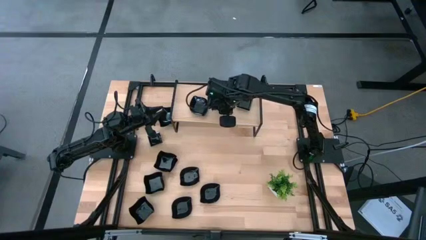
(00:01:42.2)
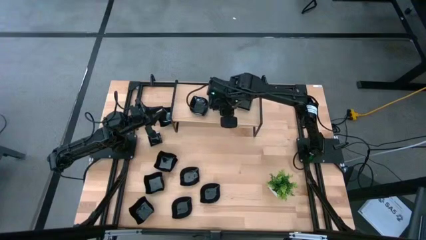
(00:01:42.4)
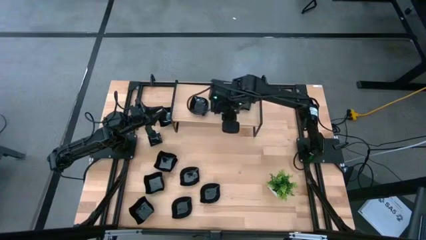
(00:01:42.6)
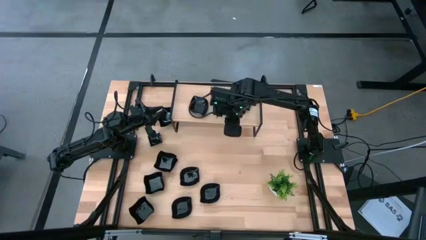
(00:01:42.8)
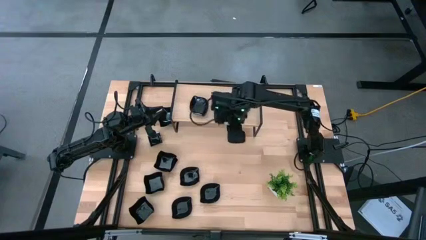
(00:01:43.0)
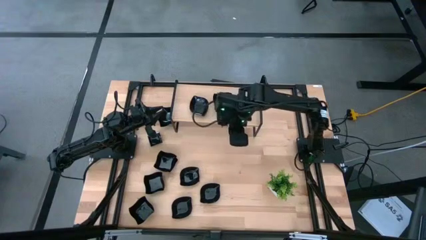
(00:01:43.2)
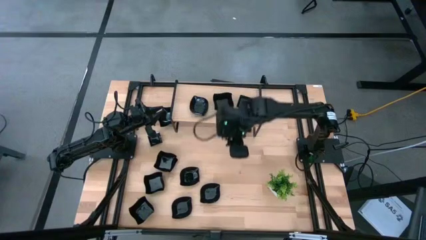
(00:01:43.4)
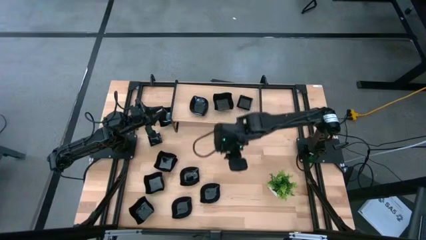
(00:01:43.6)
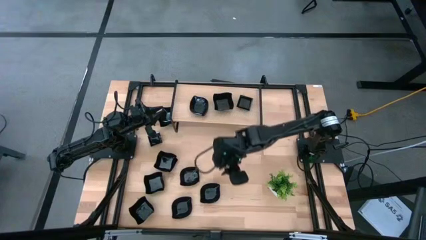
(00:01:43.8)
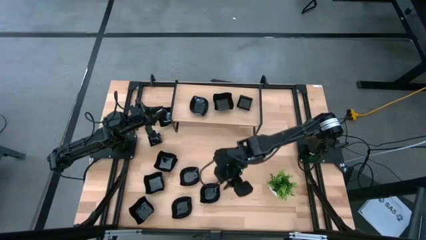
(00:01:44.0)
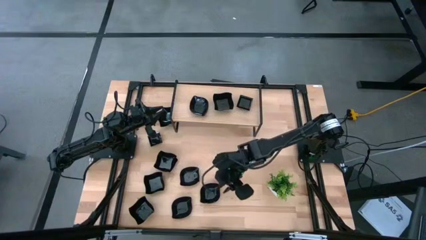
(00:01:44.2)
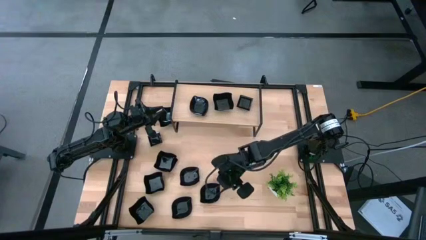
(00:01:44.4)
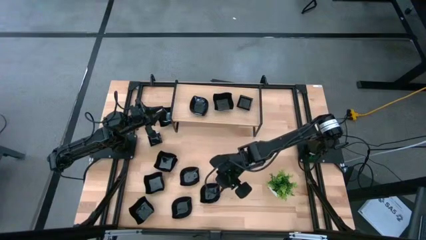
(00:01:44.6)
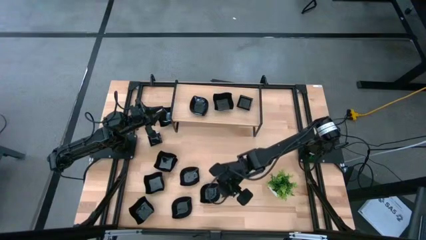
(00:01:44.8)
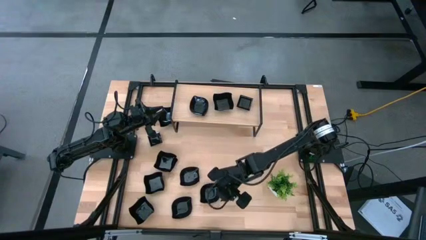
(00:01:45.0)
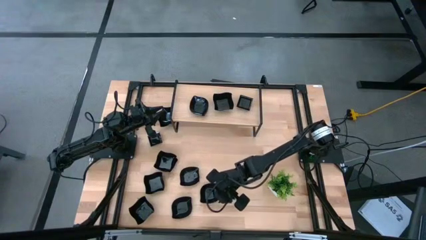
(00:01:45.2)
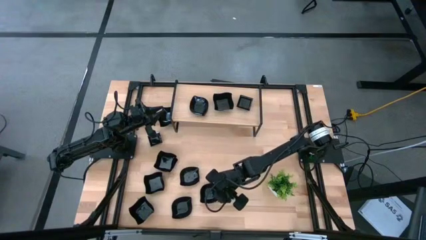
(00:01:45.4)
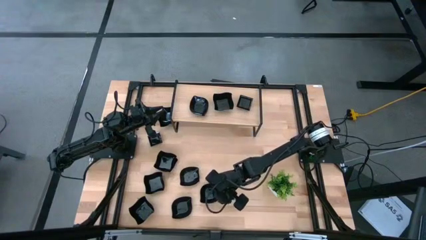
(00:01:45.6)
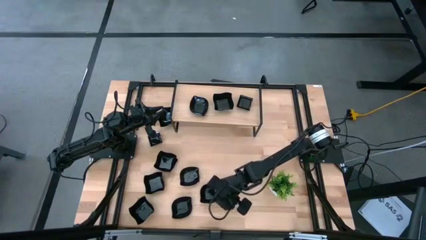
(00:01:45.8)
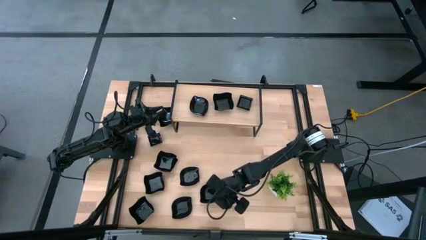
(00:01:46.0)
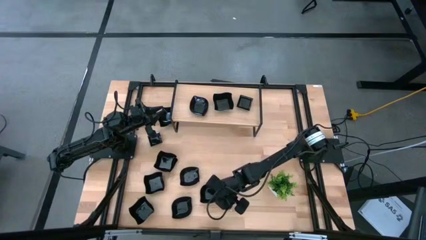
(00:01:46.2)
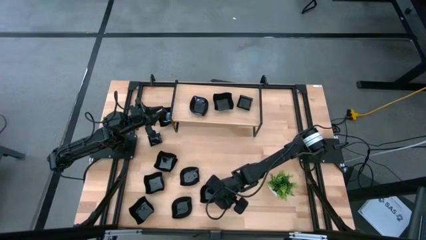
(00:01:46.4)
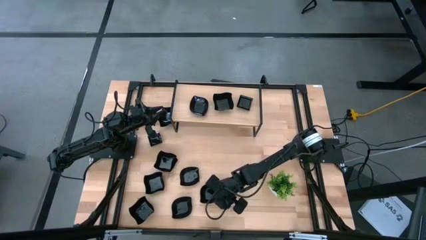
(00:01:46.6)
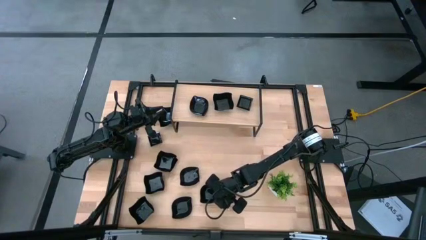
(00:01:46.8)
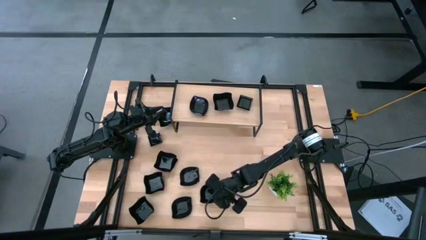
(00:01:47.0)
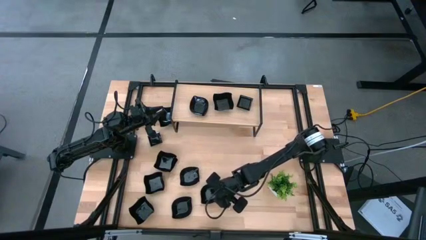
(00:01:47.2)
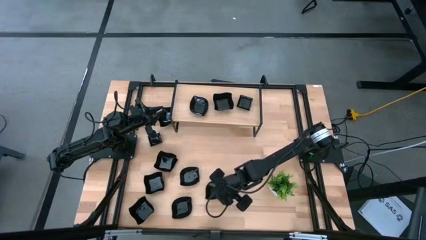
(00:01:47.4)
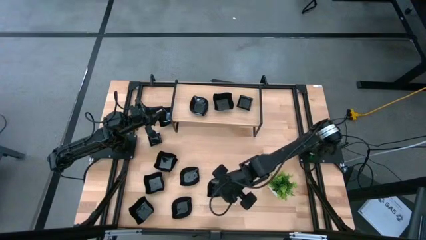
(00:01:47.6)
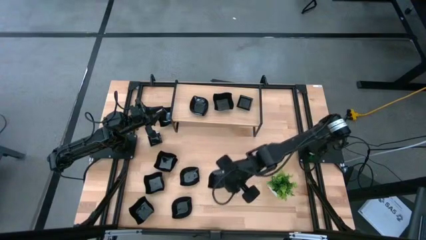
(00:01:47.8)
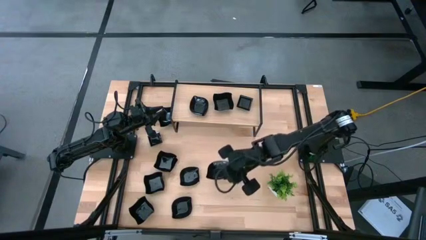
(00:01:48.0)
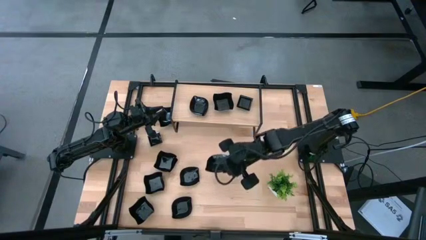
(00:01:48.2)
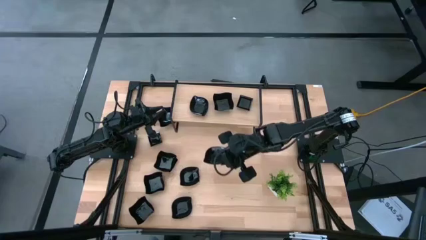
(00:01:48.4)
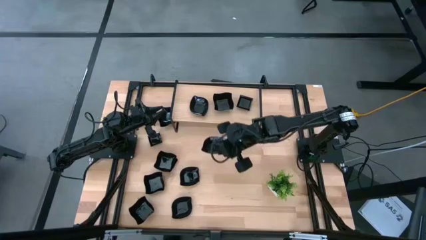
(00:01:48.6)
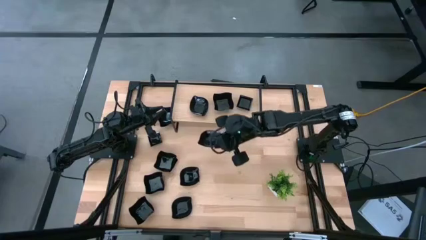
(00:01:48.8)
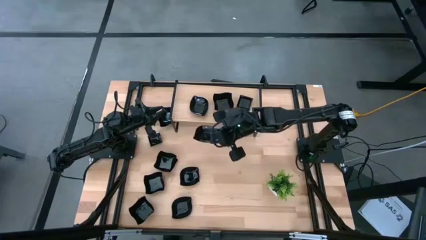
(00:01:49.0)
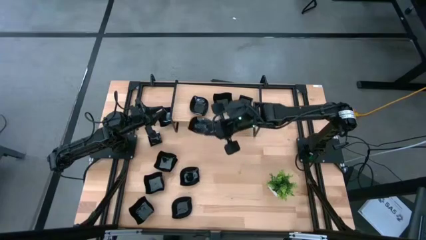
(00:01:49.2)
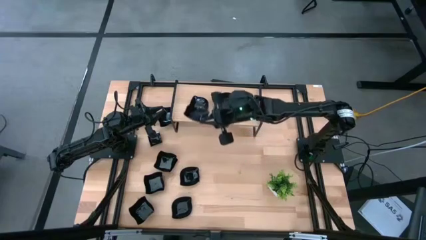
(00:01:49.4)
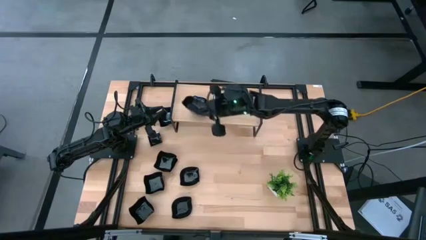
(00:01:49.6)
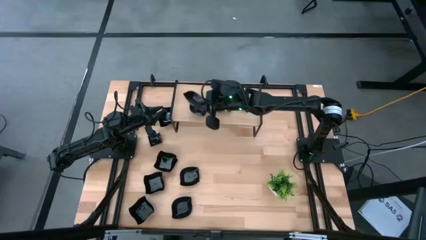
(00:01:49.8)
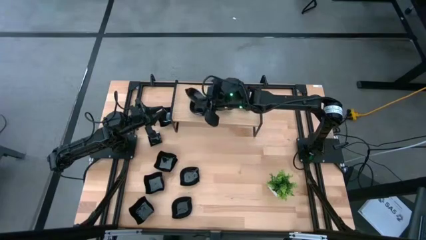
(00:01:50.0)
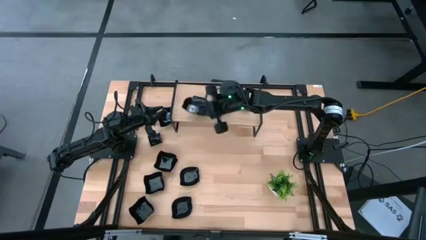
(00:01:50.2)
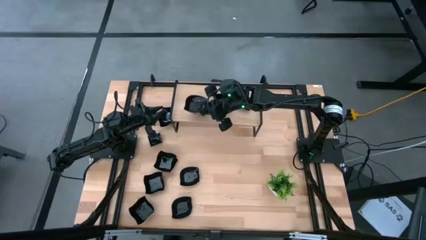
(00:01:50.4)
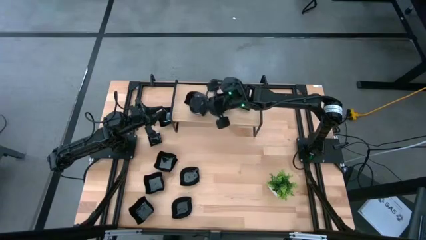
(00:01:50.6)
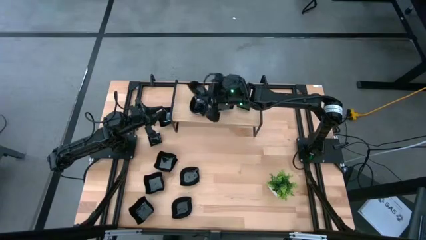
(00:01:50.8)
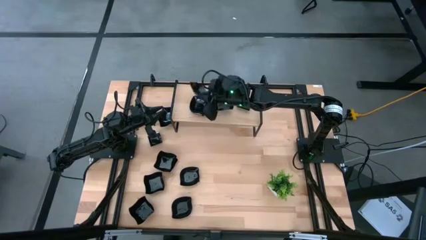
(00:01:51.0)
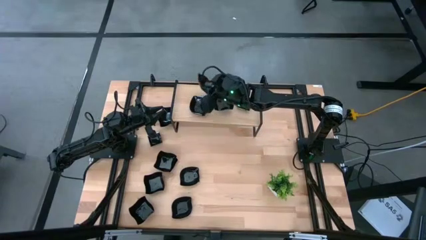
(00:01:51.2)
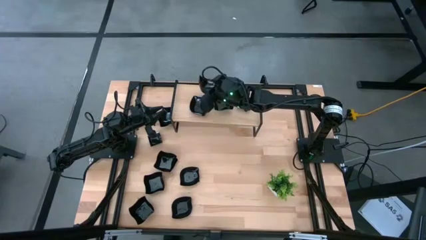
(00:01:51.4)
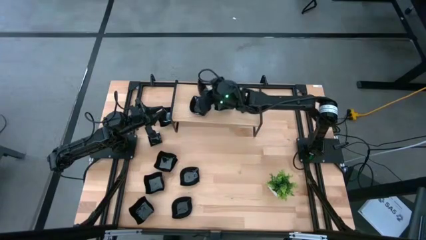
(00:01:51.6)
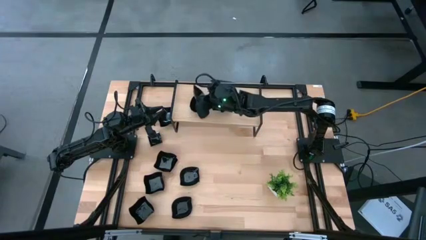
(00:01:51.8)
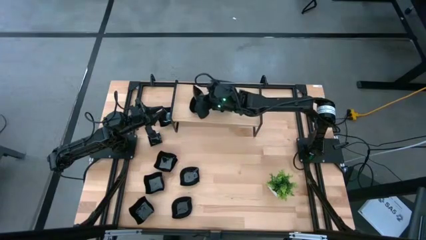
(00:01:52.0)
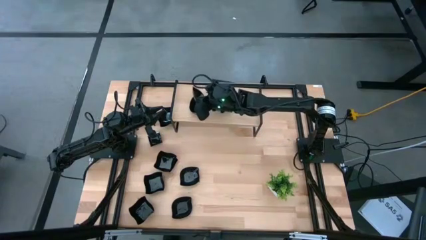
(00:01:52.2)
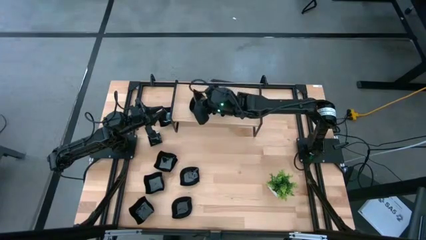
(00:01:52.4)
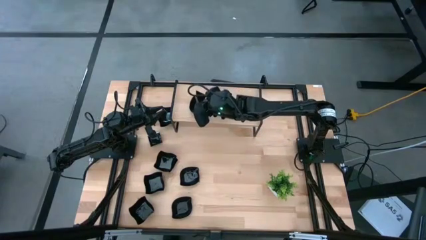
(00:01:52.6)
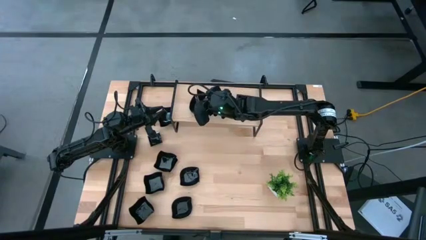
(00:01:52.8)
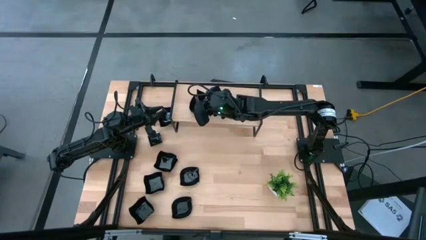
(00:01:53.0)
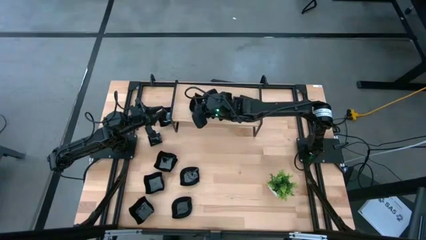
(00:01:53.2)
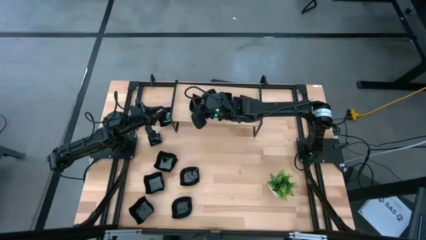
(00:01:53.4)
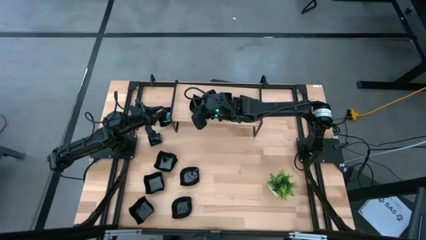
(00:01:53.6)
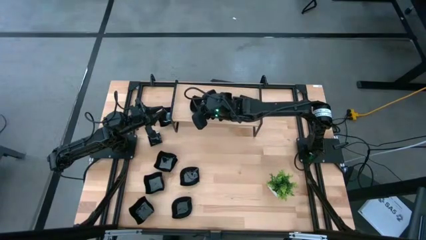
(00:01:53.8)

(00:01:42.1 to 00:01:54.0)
Task: Pick & Place Mini shaped plates
Stack the leaf-shaped plate on top of the leaf-shaped plate on the shelf

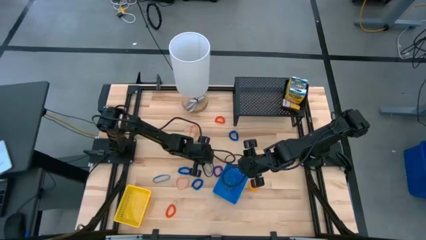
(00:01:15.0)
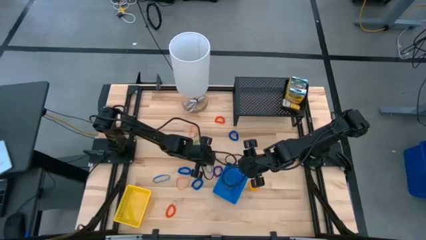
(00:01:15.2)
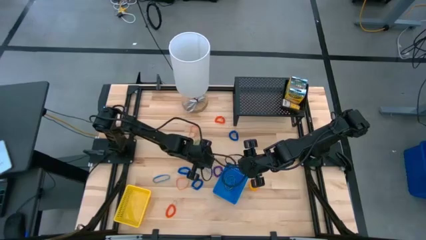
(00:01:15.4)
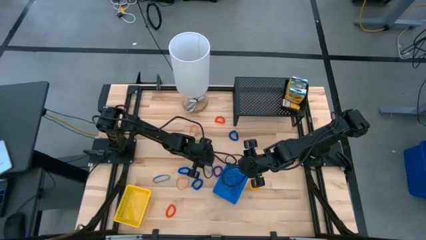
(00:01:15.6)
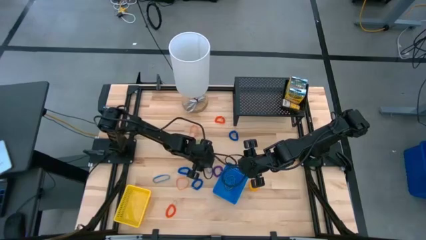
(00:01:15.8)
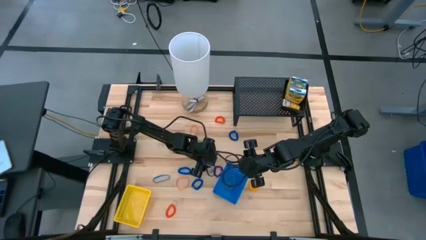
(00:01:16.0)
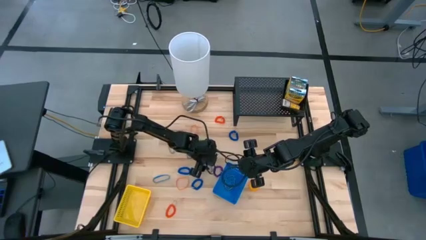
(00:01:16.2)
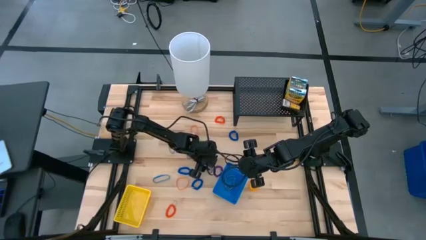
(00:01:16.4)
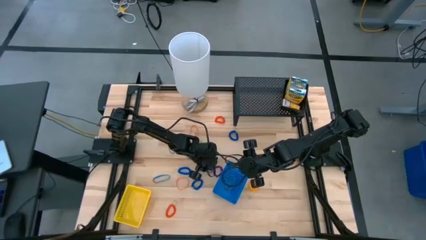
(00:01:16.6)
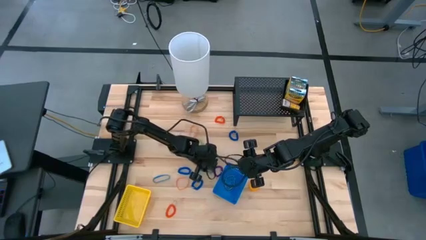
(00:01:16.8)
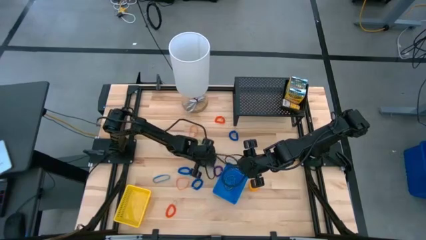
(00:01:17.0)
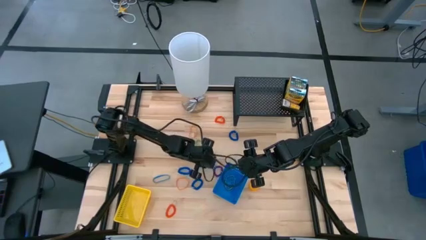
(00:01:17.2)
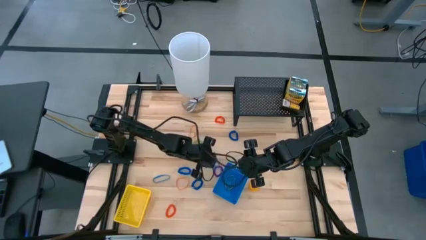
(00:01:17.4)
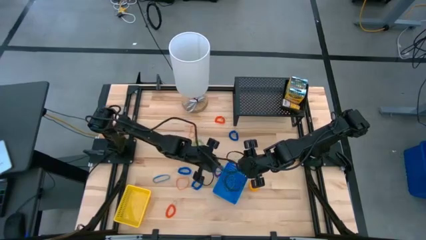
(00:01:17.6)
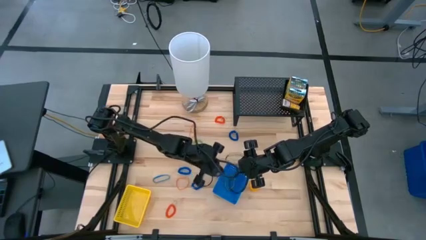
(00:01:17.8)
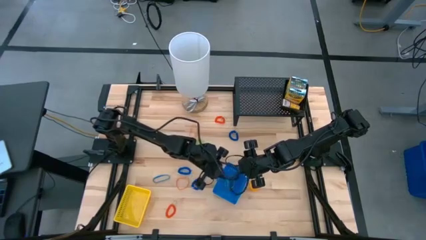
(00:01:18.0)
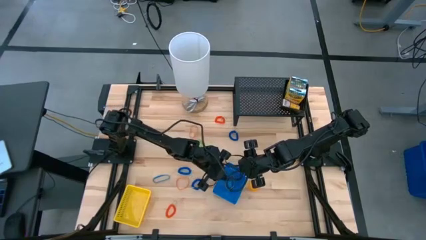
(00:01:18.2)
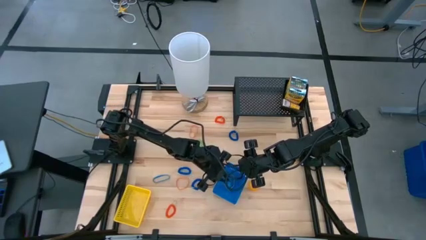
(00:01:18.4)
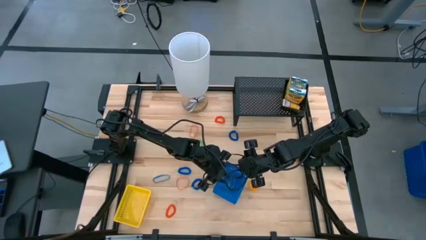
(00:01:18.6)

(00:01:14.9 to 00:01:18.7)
Task: Pick & Place Office Desk Supplies
Put the blue rubber band into the blue bin
